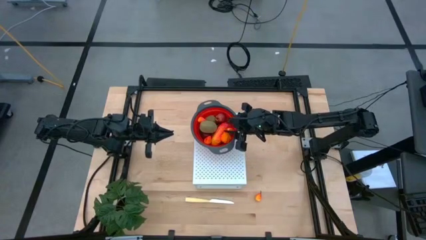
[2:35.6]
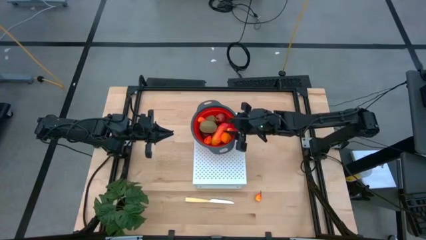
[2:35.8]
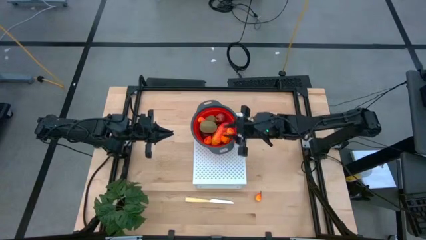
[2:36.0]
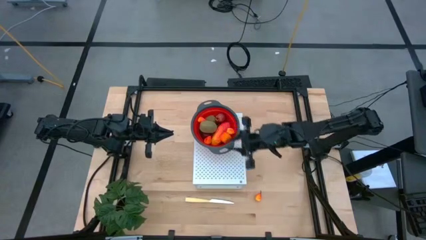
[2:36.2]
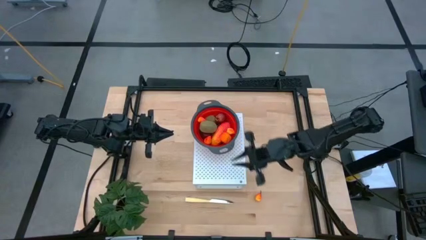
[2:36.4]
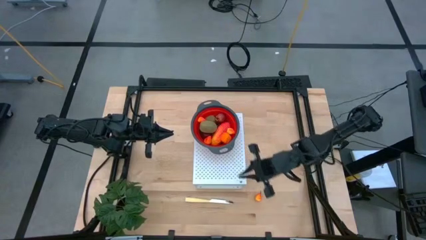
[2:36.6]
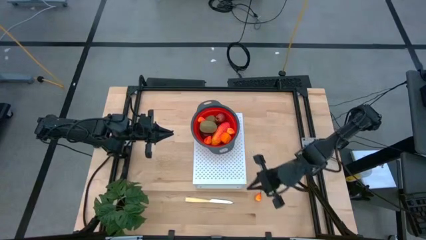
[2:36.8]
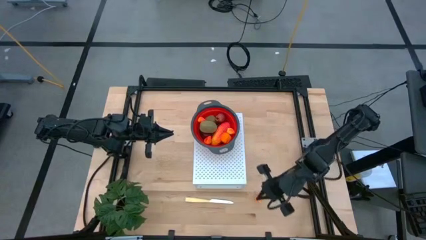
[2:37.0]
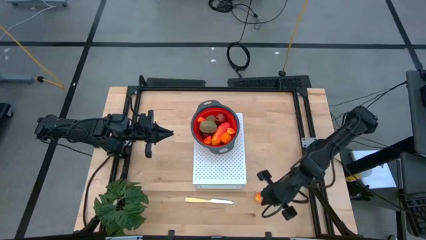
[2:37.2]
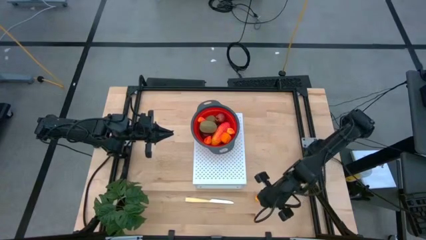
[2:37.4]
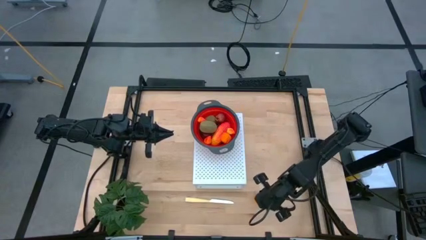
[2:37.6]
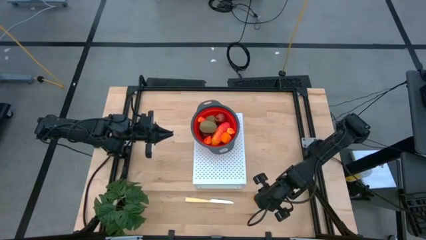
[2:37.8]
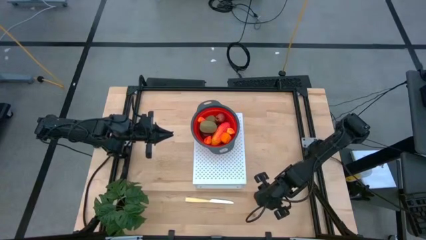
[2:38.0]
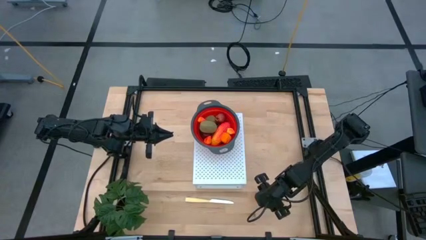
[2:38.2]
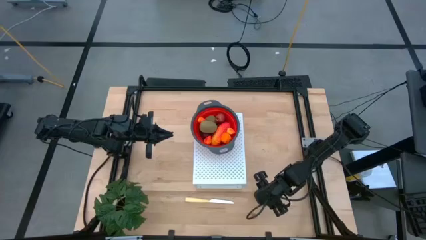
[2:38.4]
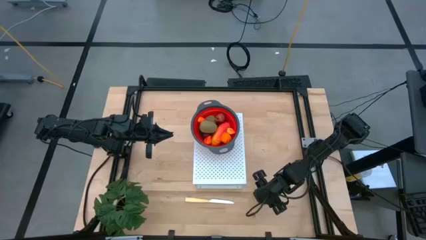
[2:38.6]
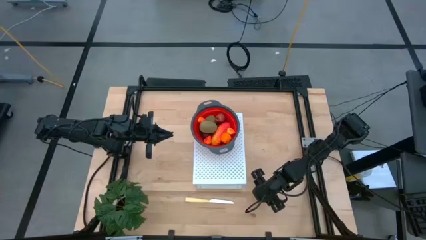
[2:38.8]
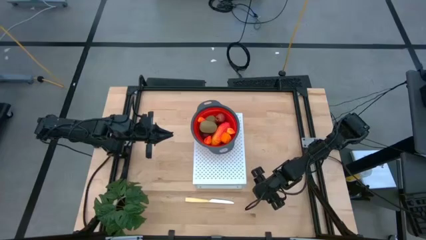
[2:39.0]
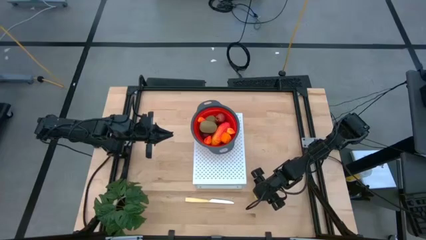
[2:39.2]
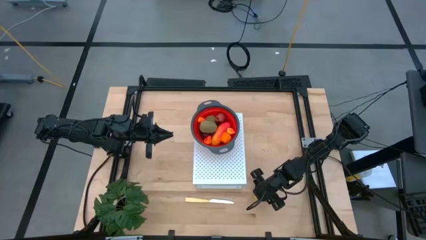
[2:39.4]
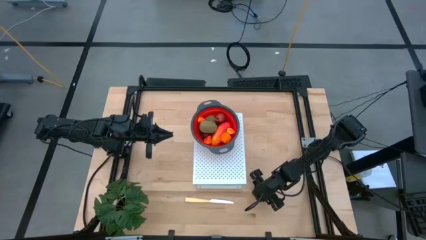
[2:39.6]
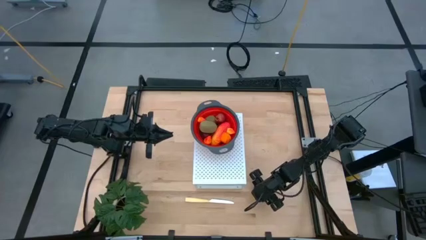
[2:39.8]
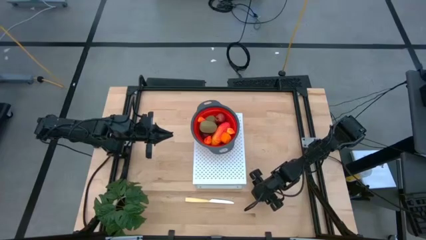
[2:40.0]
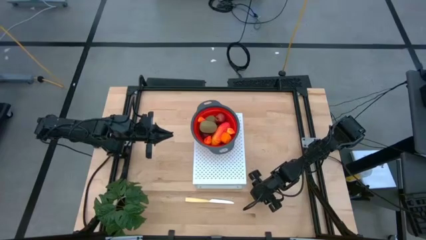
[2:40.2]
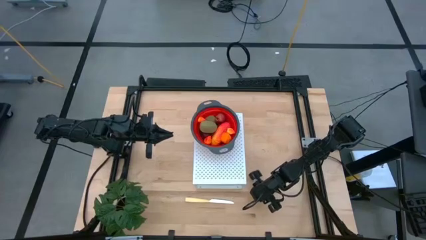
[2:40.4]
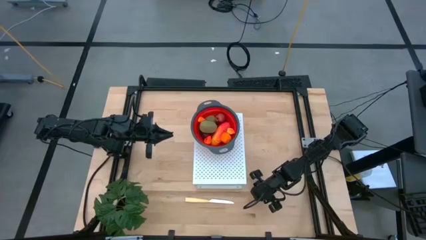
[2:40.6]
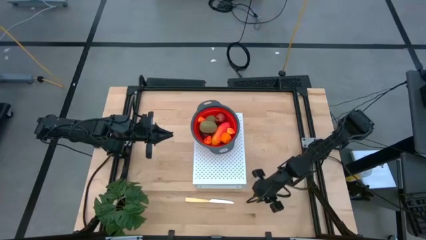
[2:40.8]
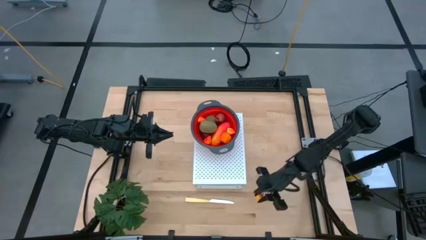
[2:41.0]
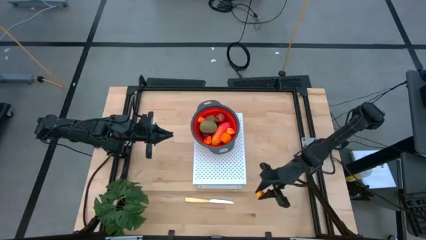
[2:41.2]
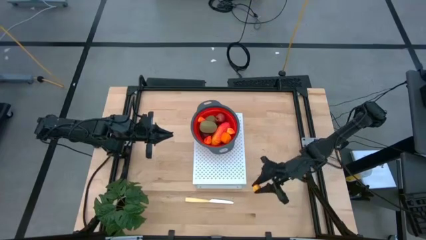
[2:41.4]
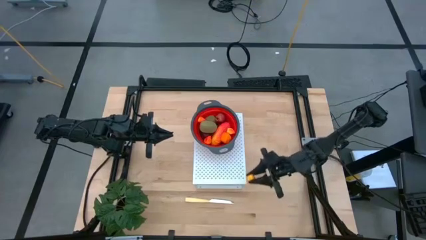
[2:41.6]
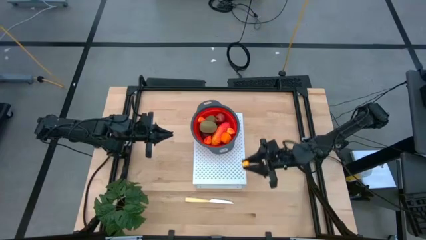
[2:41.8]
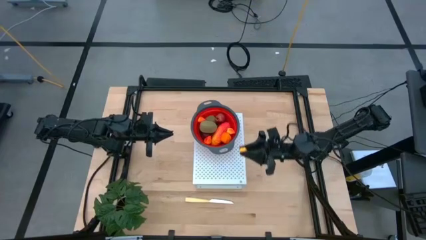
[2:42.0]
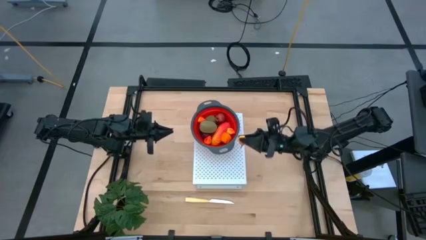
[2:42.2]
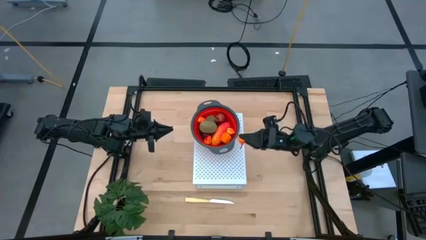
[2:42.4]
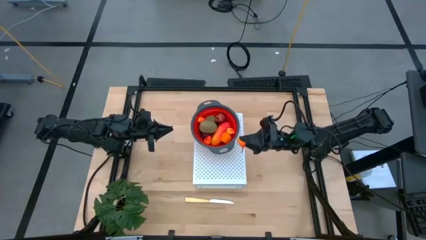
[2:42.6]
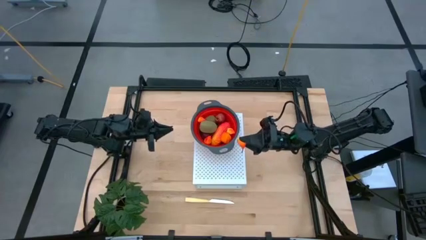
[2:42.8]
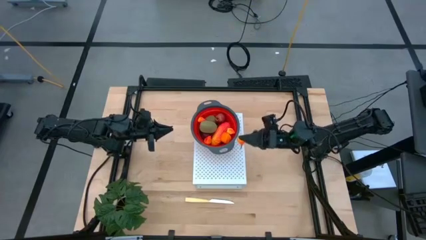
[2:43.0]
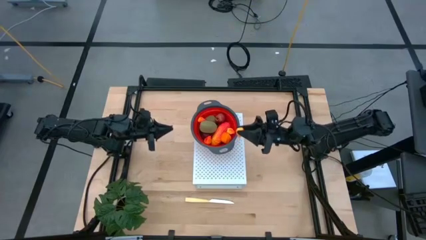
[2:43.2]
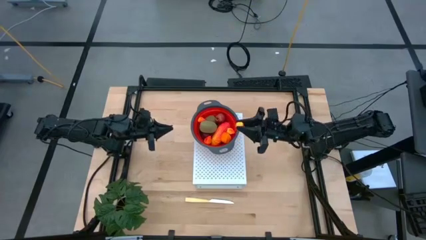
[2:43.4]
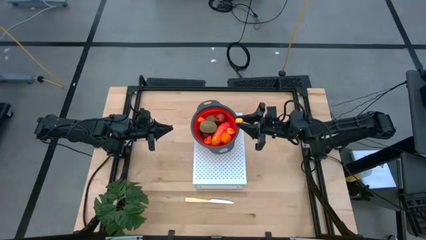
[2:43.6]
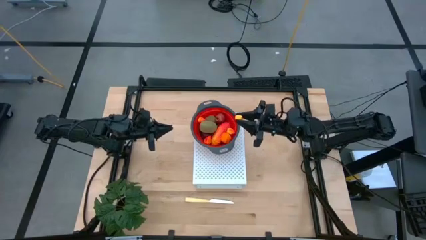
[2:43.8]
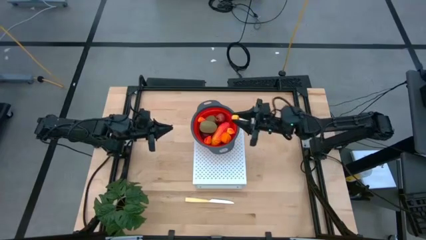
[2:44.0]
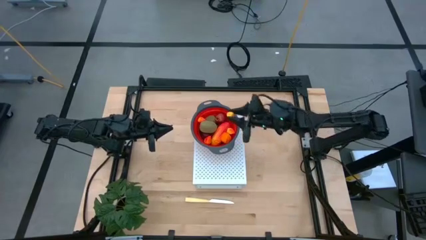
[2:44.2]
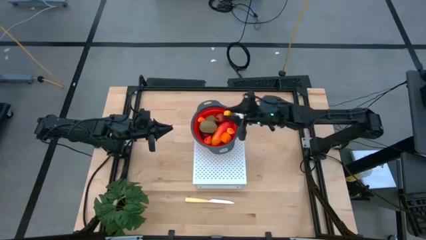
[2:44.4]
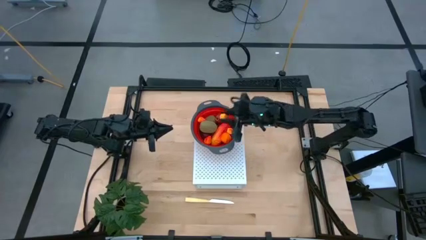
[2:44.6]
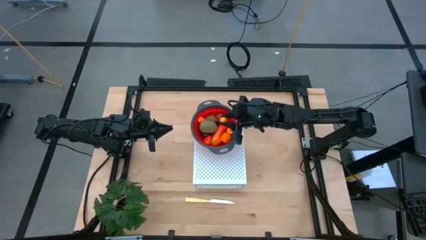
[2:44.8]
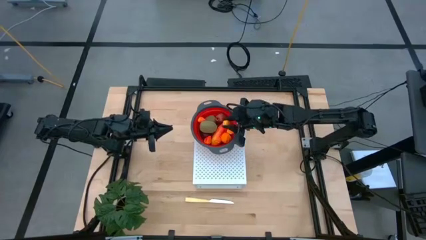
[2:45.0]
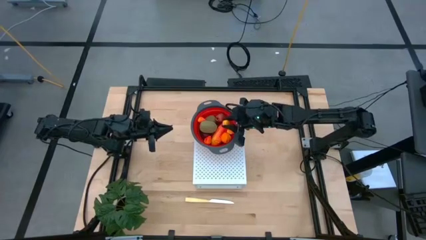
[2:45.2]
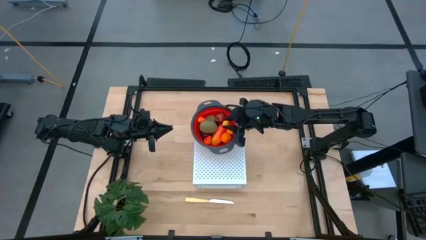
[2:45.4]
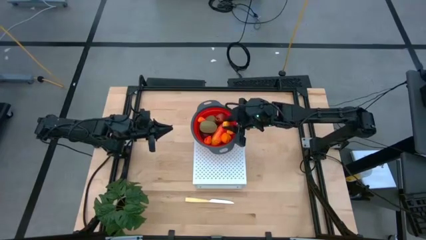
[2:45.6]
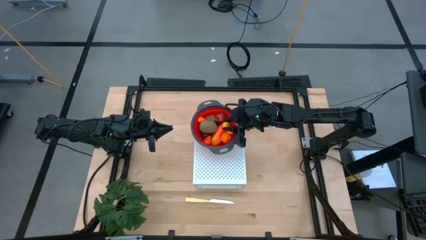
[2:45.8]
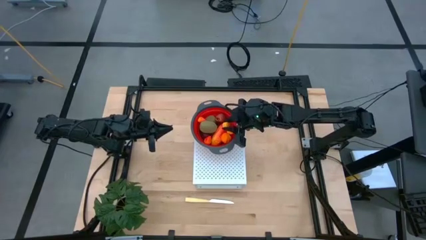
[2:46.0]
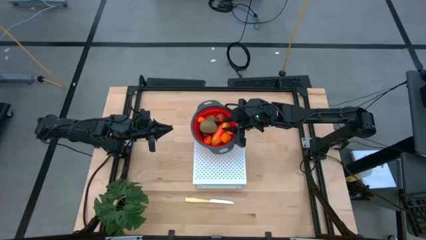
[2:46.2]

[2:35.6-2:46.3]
Task: Pick & Place Fruit
Put the peach into the red strainer bowl on the shelf

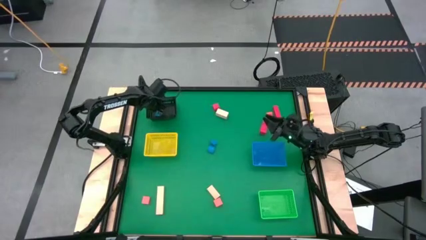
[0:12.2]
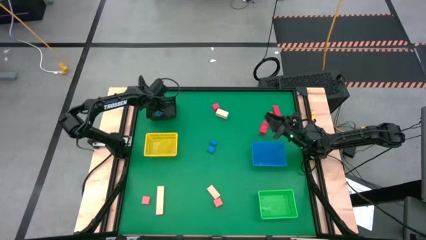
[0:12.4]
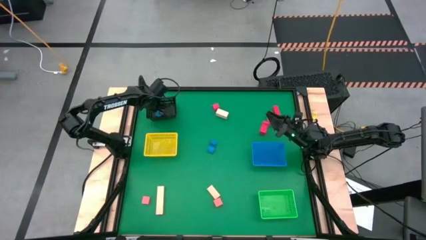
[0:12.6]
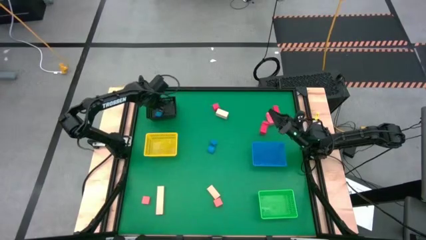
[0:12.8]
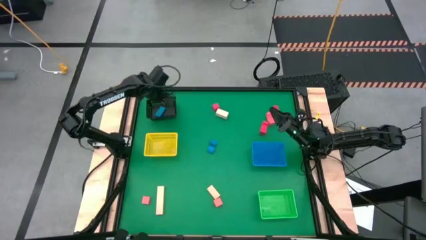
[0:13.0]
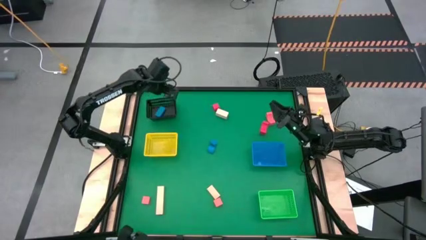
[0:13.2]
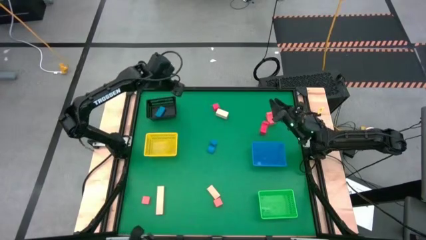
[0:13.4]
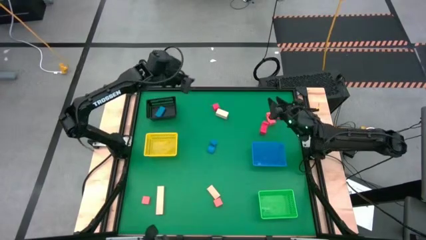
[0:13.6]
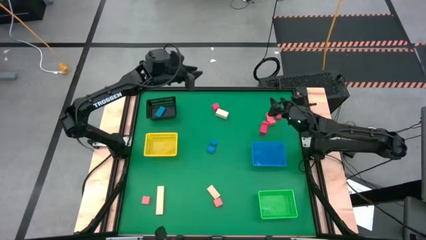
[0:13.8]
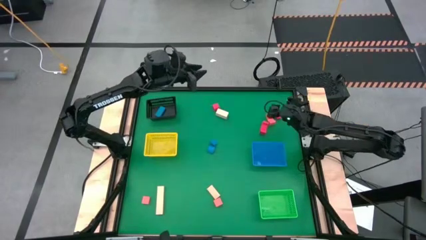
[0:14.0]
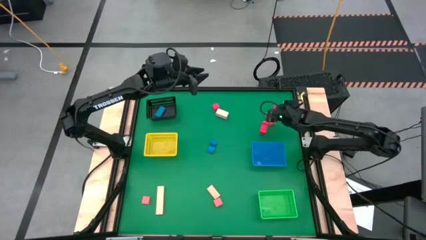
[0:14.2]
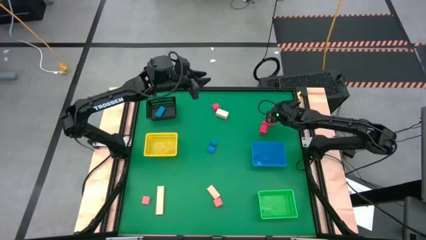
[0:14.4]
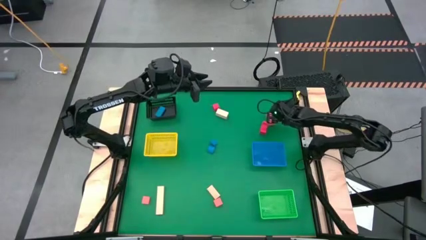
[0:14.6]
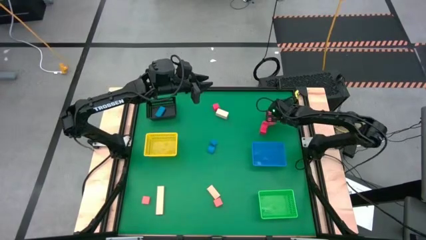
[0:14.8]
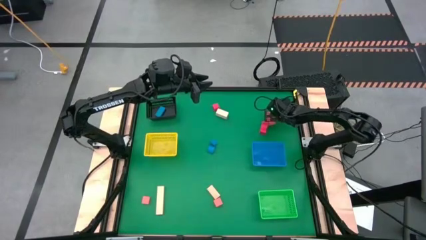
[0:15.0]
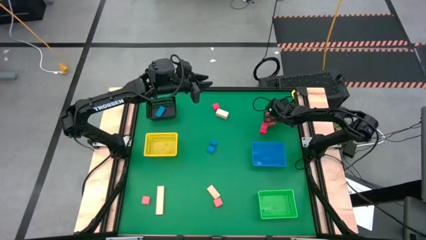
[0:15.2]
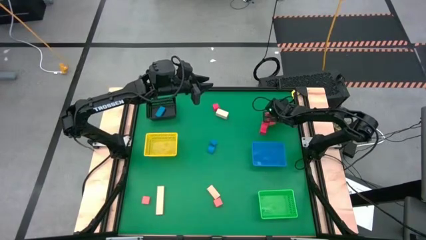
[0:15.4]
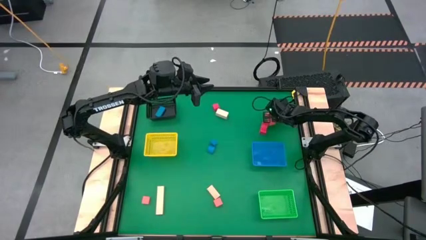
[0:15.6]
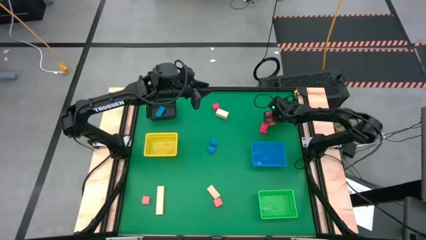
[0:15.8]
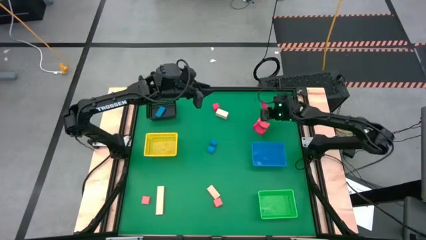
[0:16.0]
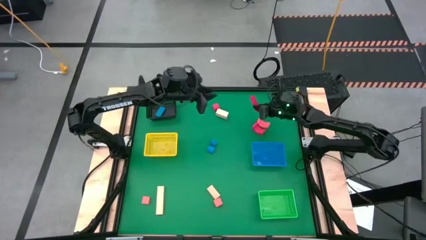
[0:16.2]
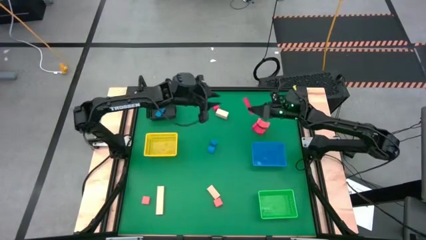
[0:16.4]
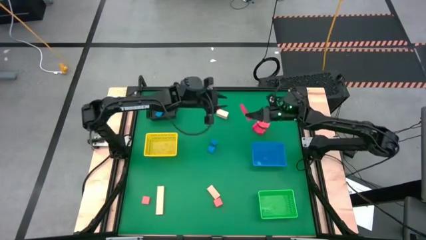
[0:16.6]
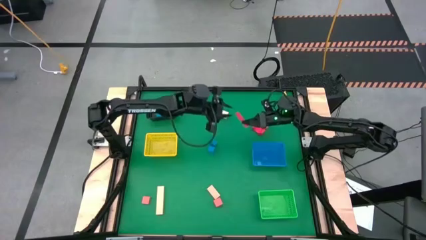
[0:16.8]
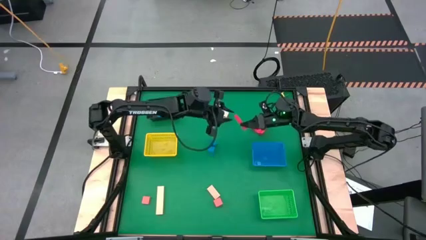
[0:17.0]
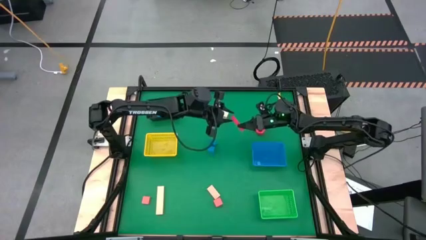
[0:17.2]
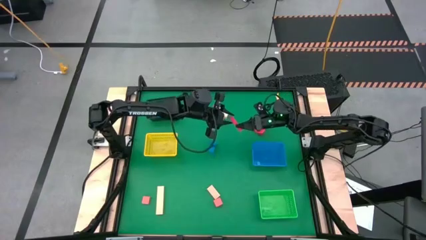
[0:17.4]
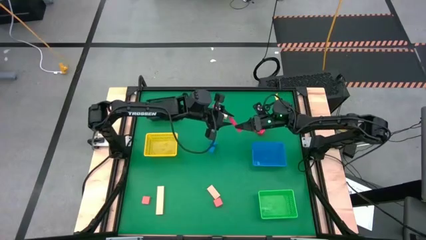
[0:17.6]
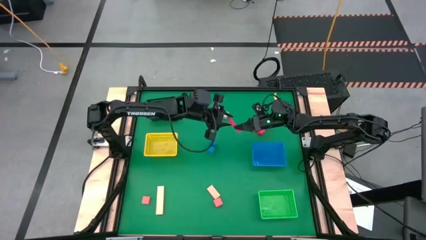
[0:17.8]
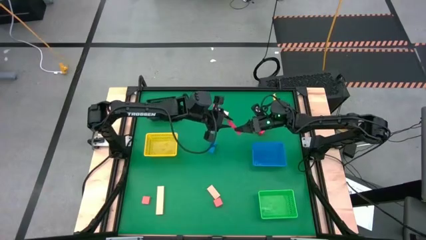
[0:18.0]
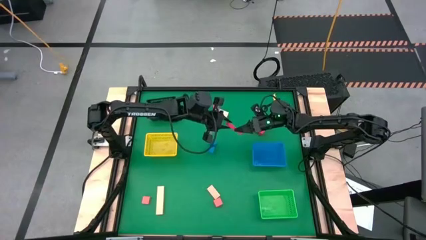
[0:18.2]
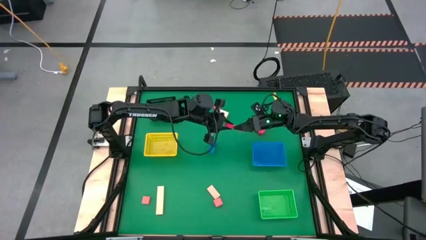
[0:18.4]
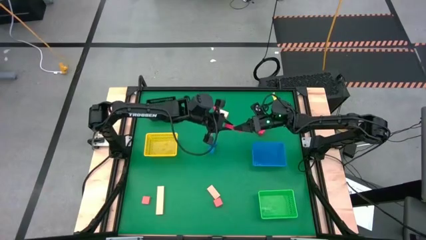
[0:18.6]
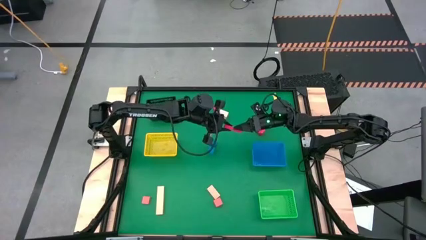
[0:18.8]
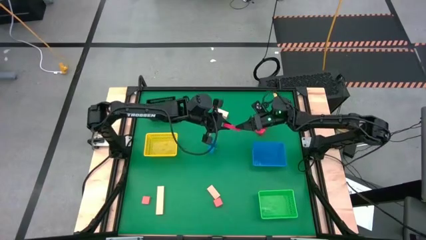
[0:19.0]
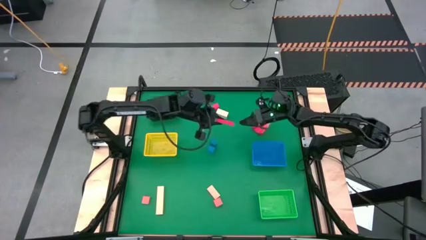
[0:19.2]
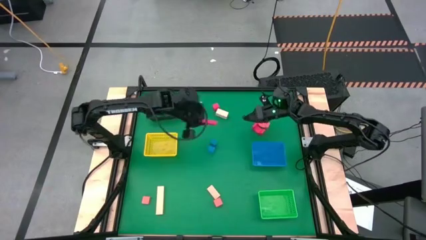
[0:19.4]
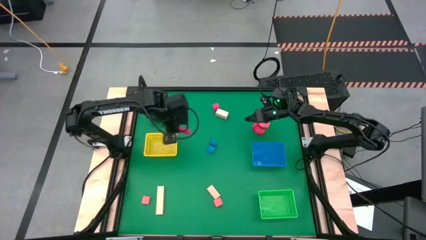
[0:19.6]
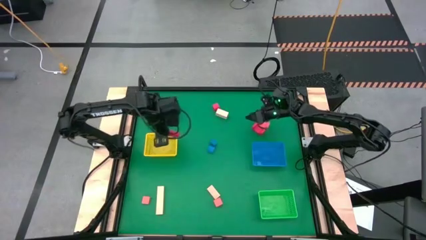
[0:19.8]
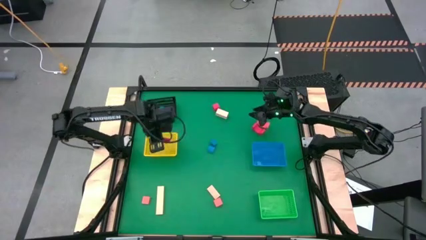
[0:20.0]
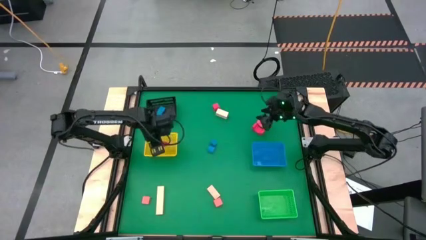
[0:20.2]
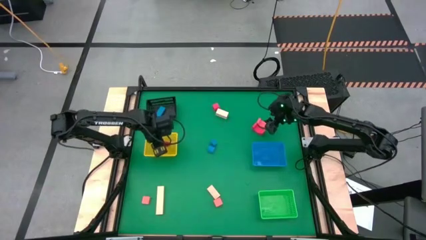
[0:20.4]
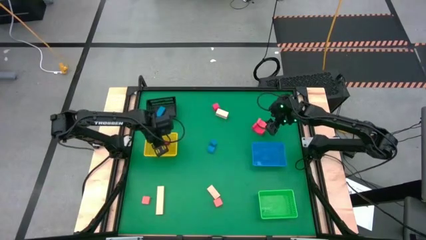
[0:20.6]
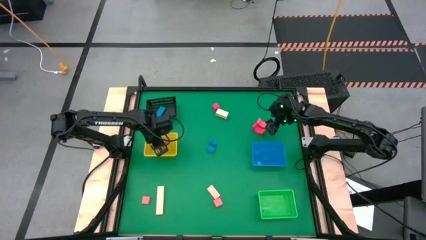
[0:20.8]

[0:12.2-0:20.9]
Task: Sort & place blocks by color
Put the top right red block into the yellow bin
